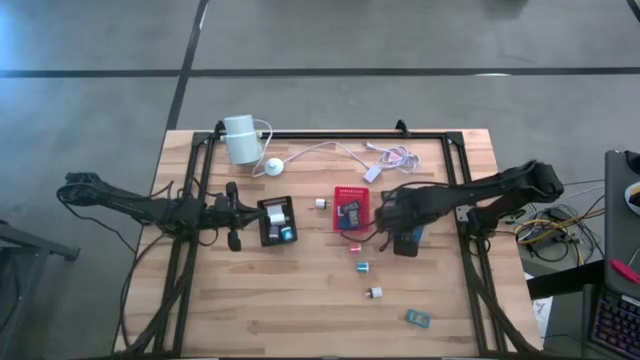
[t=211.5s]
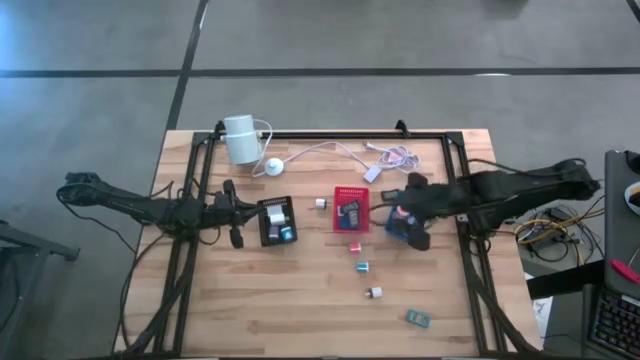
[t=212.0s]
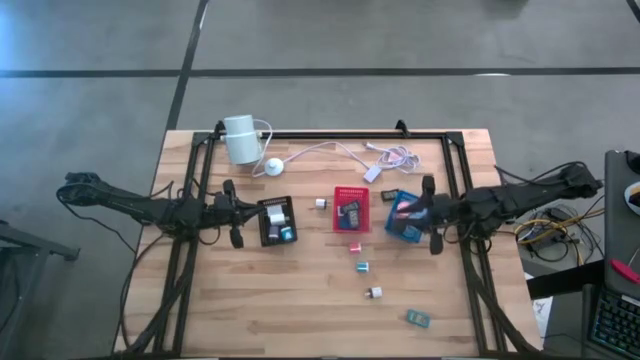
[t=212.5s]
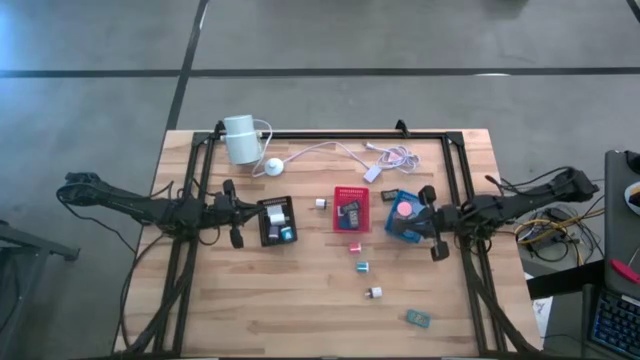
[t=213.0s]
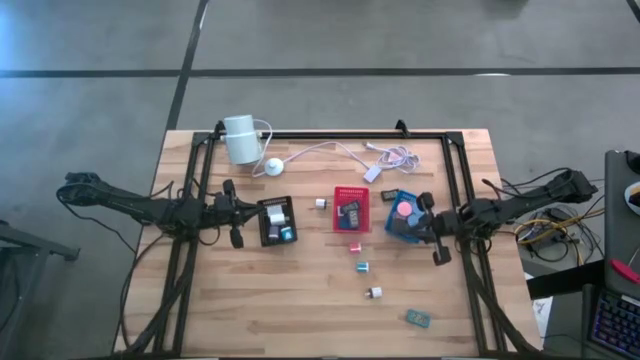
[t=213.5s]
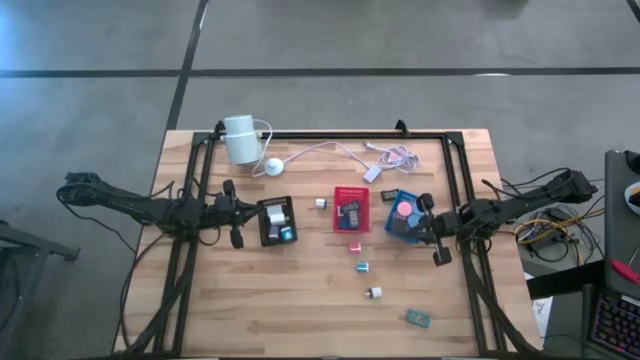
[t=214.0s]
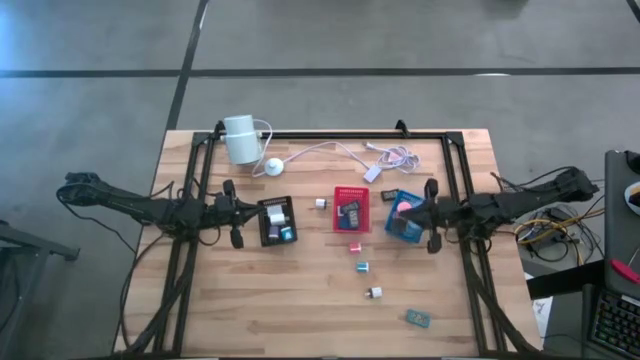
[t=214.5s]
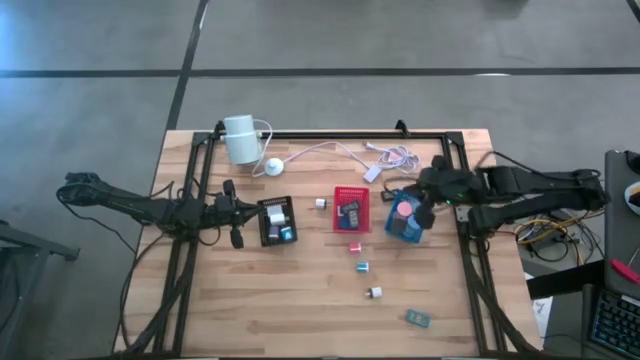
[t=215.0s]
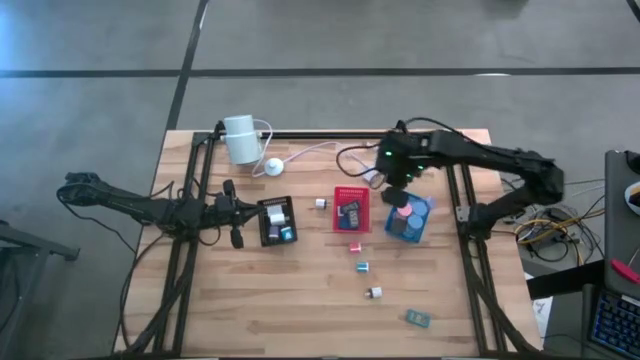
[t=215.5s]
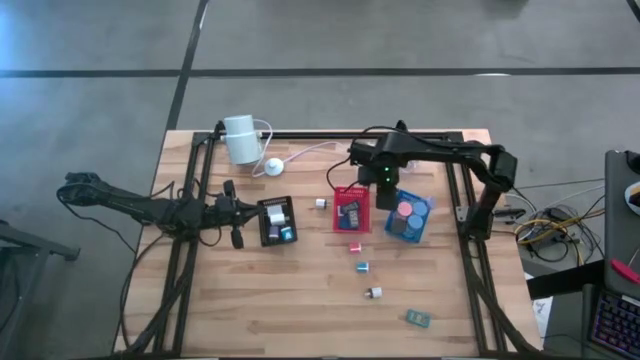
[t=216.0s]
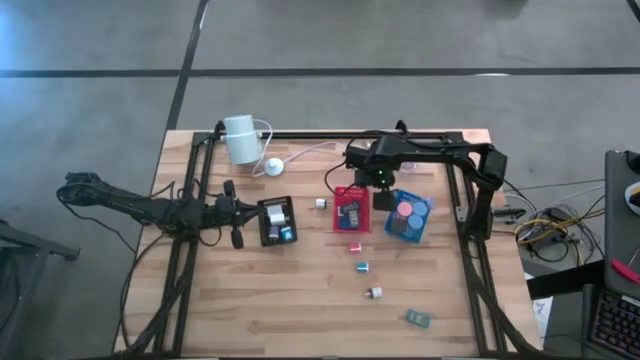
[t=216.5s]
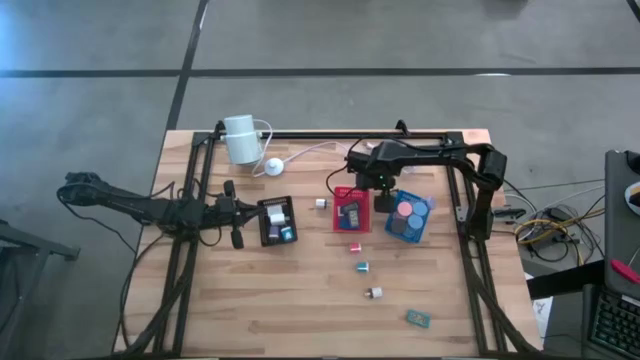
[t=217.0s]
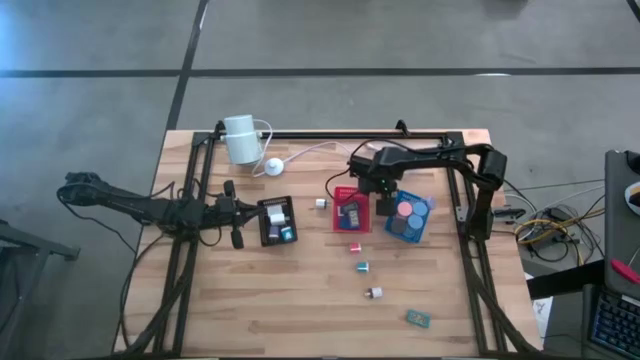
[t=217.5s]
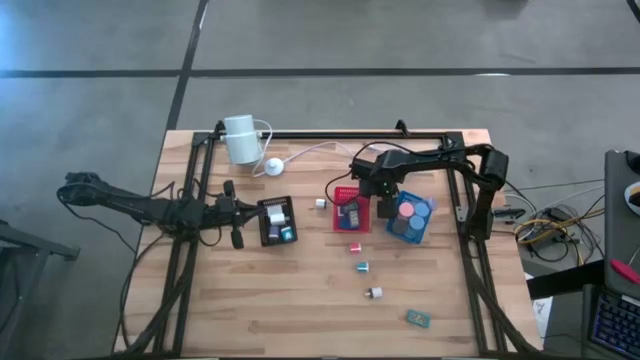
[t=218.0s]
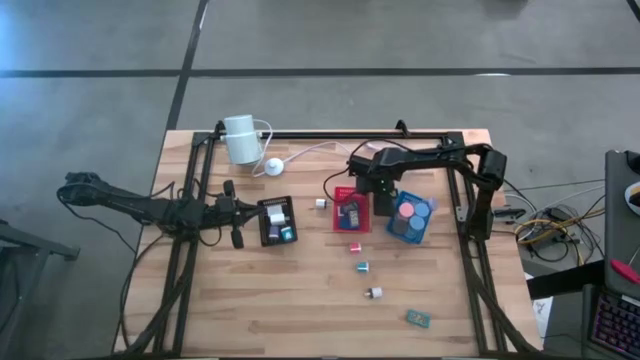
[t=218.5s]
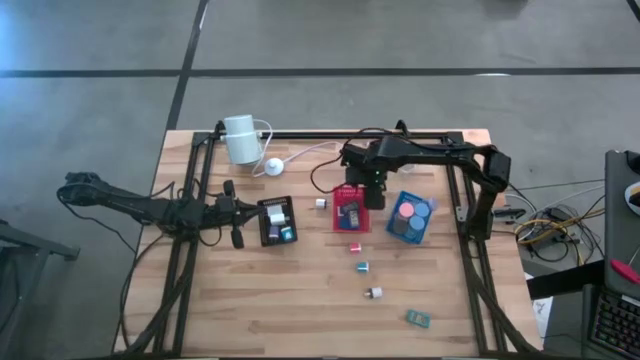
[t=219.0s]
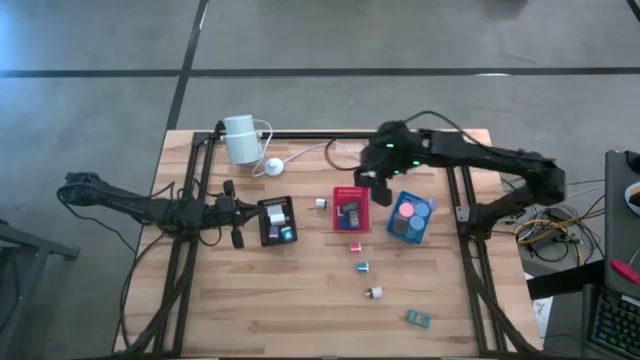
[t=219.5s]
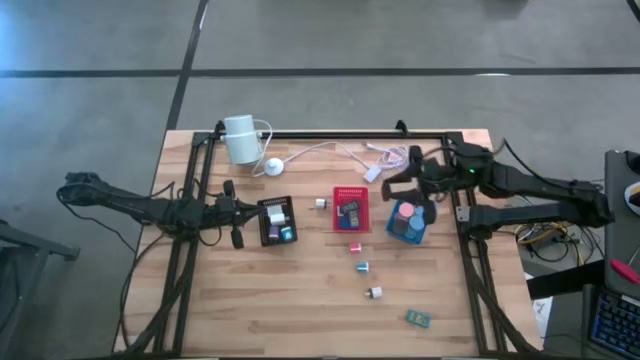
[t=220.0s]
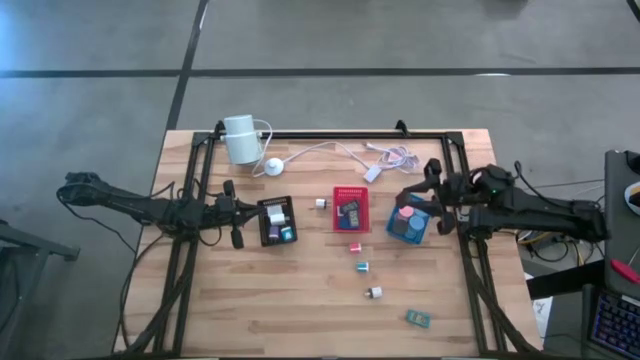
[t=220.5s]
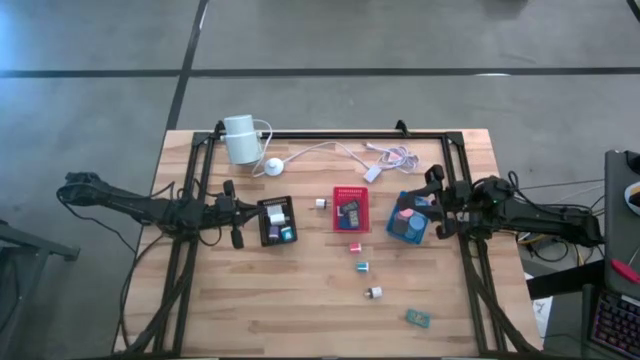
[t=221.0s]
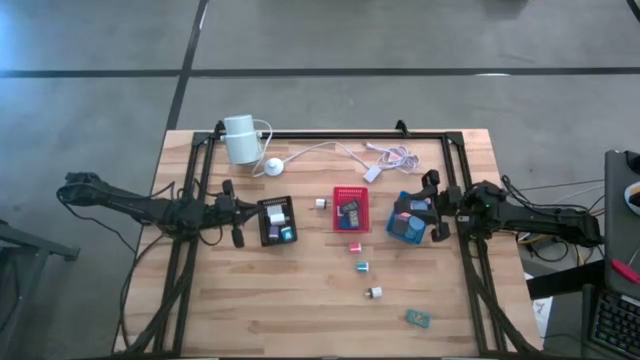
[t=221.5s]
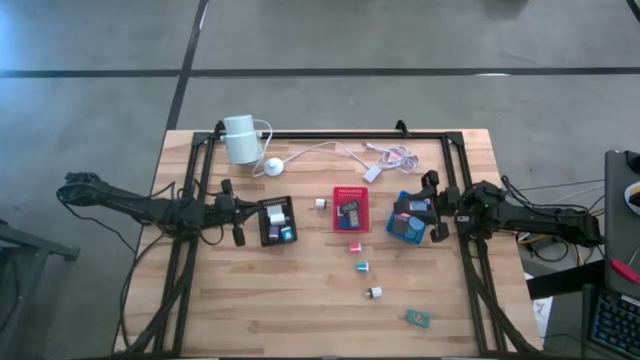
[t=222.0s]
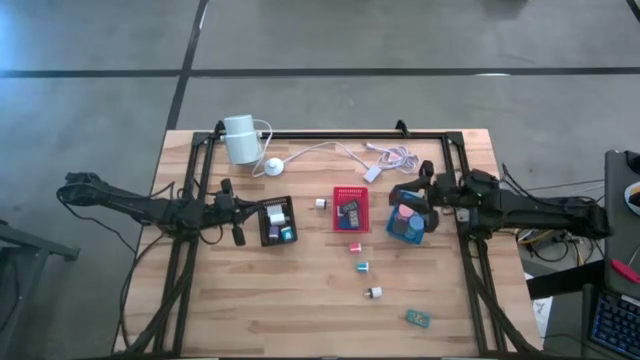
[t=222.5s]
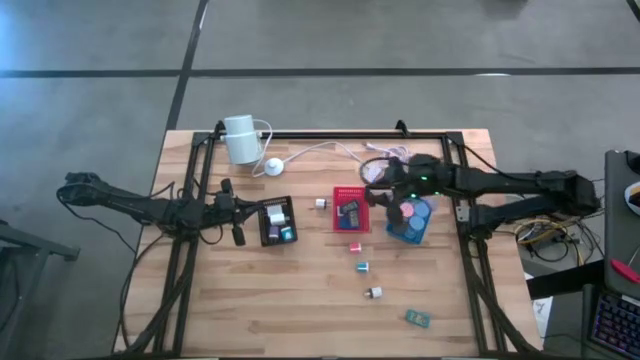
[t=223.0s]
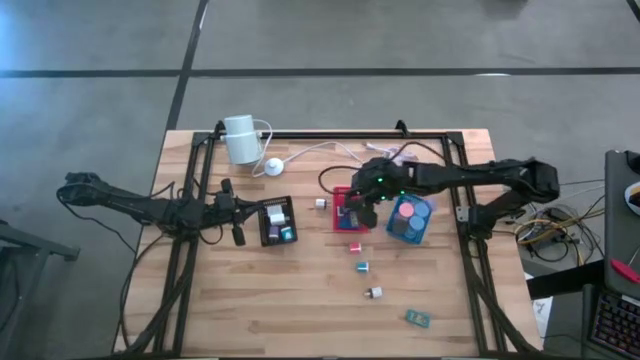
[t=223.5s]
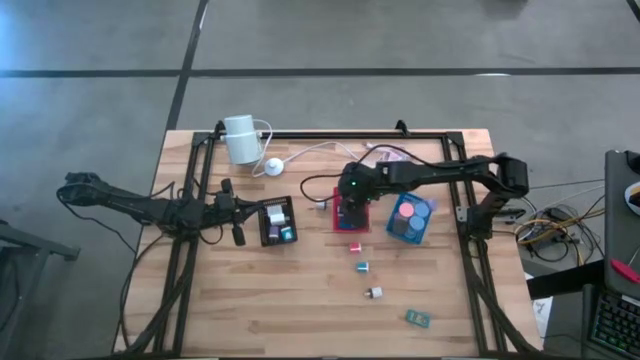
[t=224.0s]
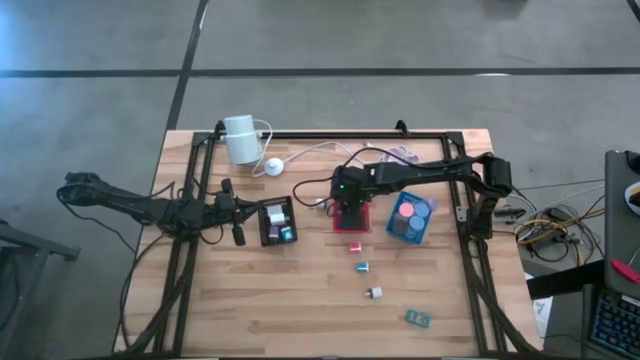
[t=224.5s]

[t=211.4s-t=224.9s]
Task: Pick & Place Office items
Put the black digital clock into the red bin

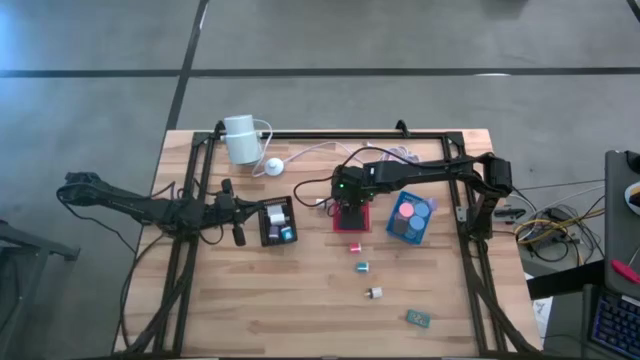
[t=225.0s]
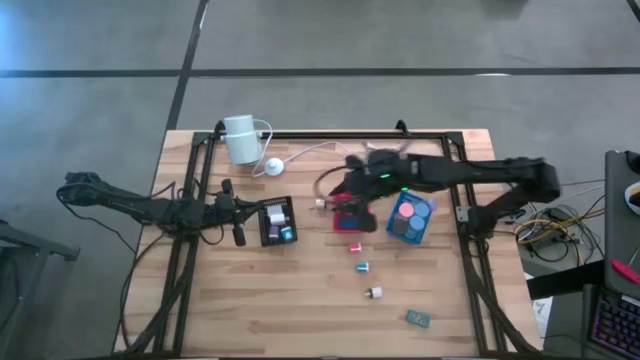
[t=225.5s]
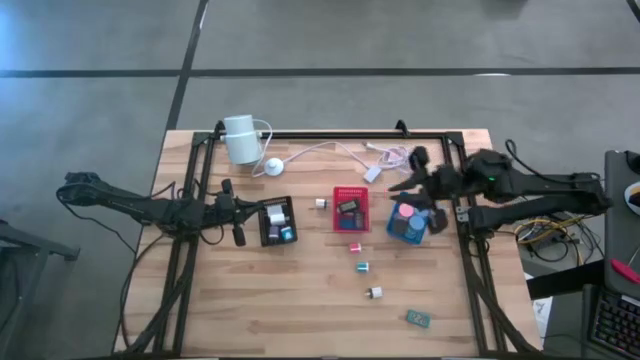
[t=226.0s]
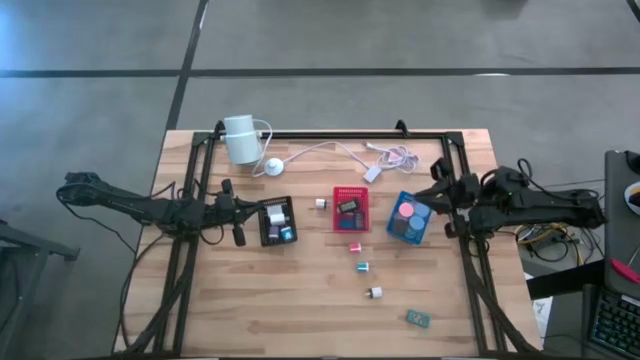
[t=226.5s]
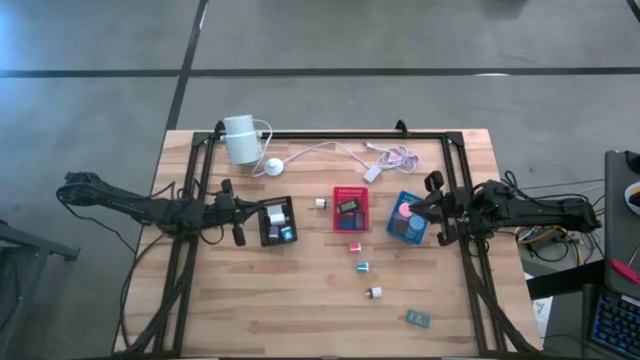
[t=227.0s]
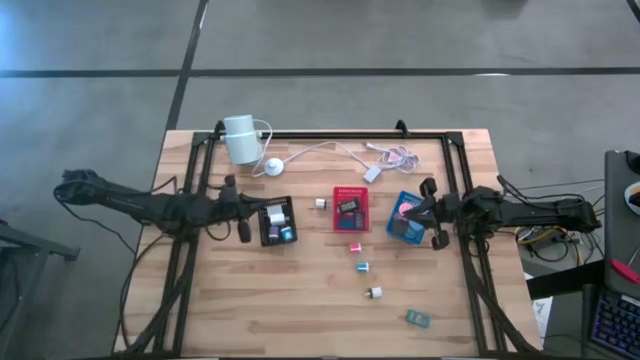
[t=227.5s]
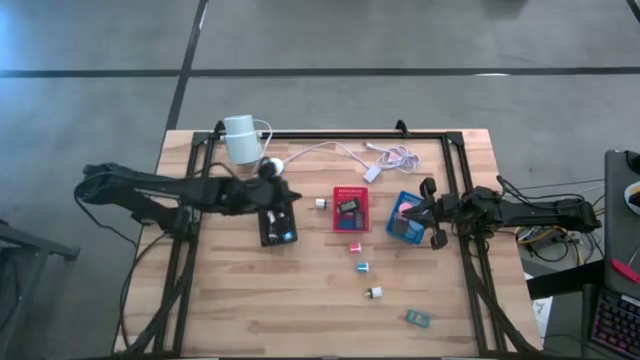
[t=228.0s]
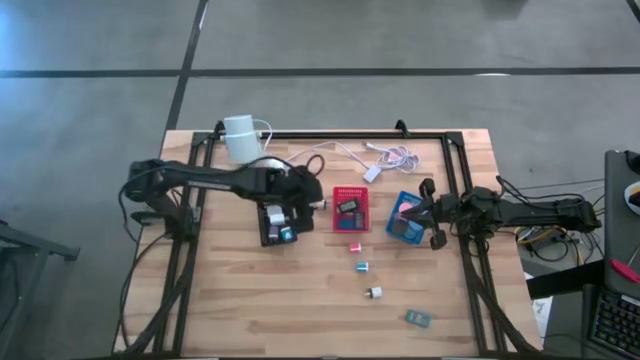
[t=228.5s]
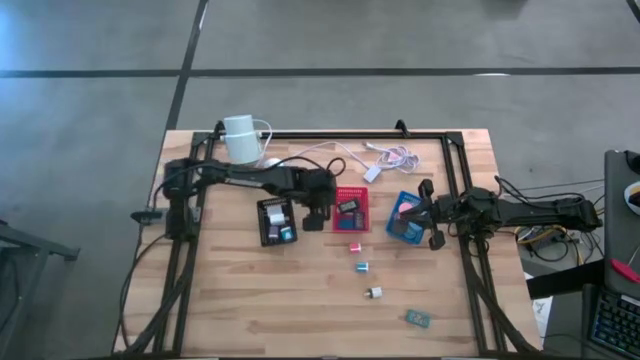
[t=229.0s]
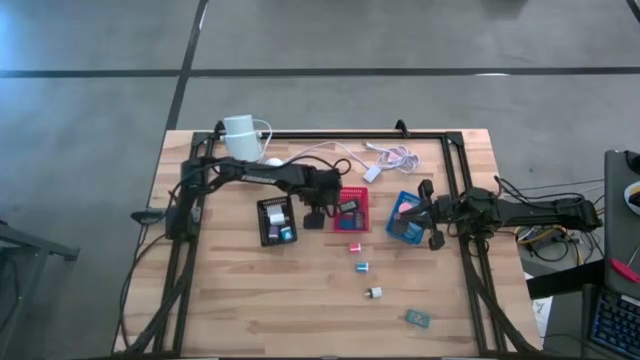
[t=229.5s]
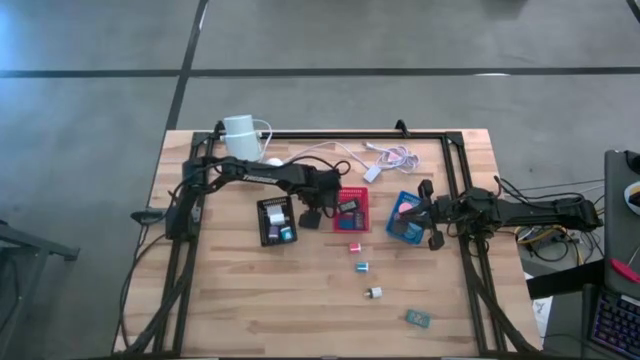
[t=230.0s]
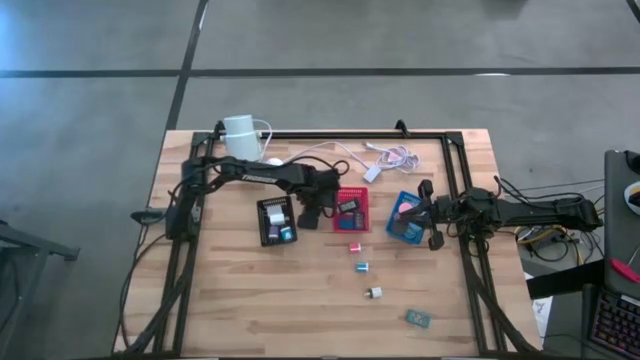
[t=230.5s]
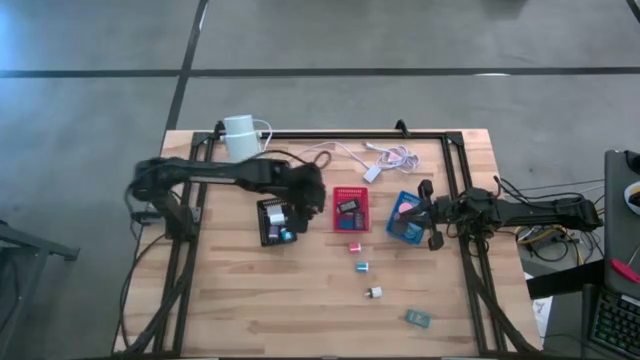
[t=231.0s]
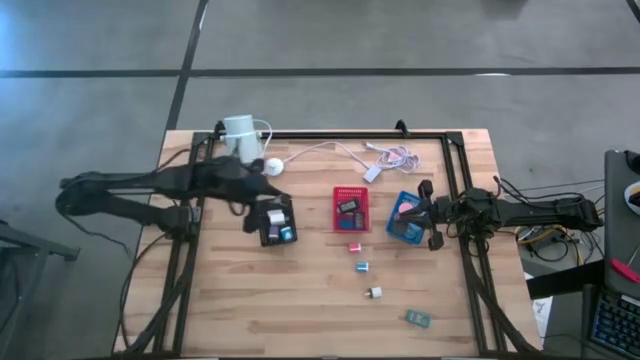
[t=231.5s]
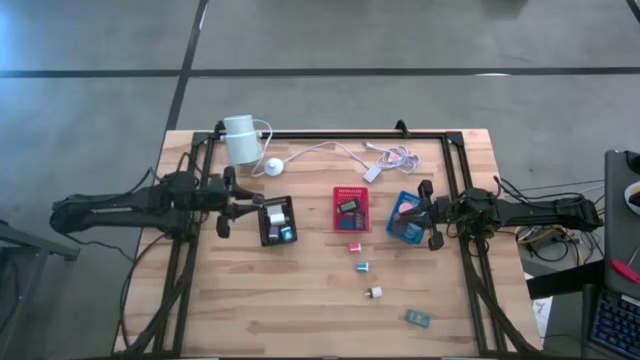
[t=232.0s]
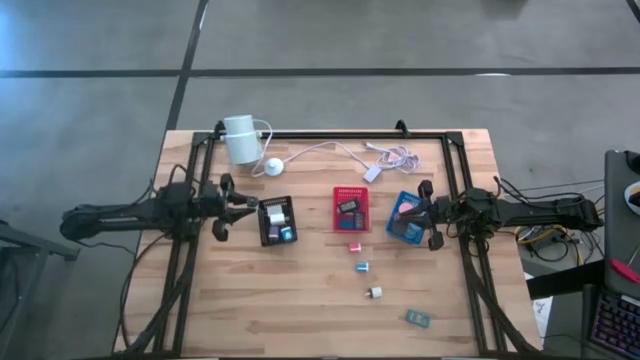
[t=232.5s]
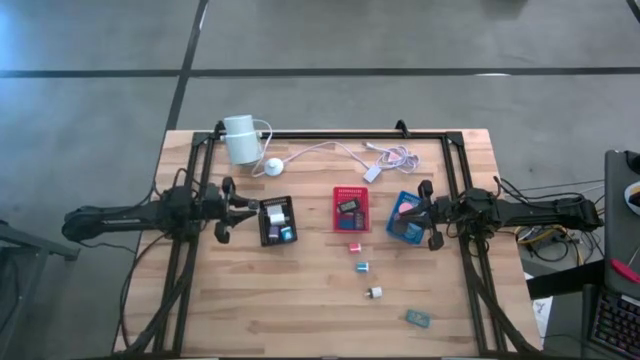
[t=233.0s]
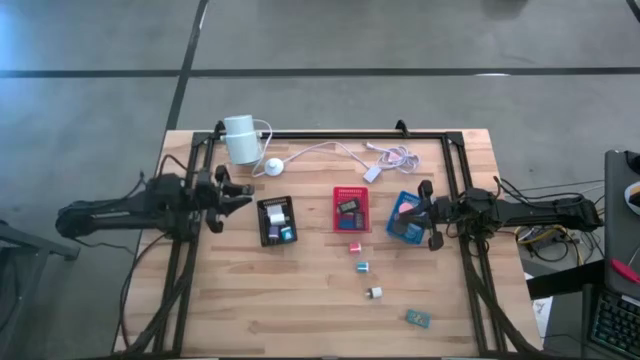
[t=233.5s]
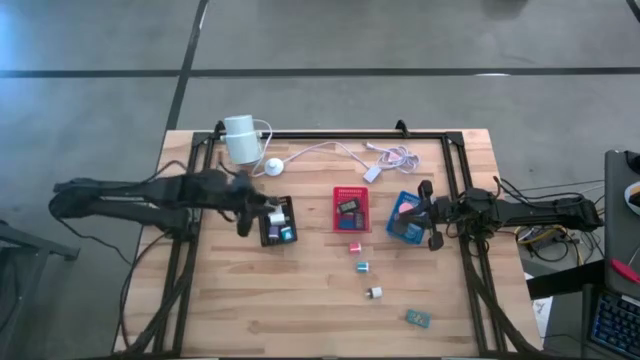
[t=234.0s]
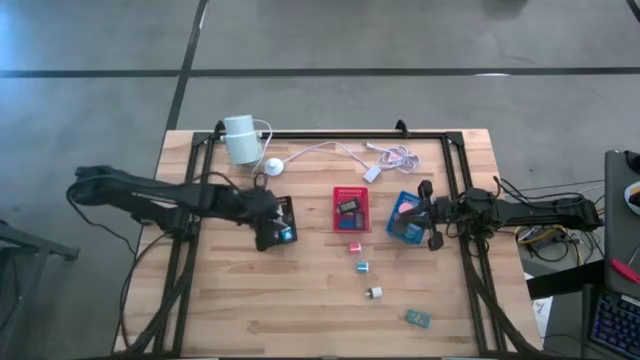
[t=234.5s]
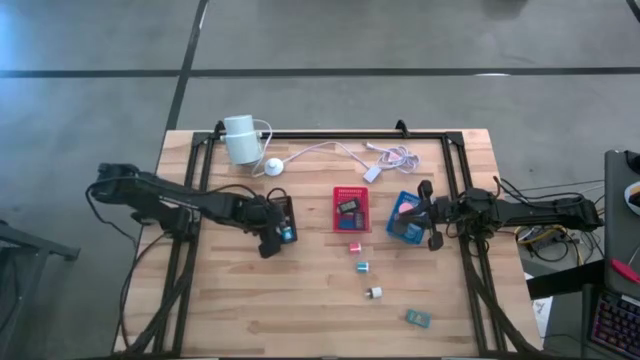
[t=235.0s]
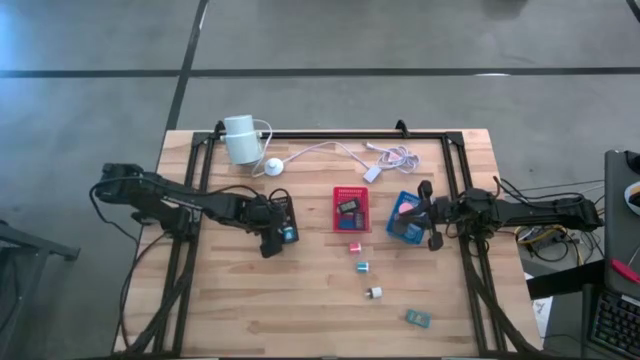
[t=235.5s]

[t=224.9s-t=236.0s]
Put the top black white charger adapter into the black bin
